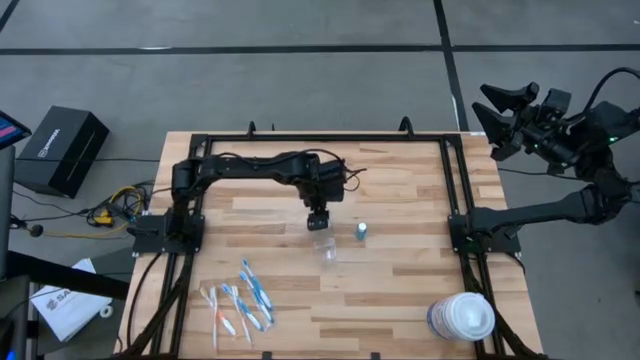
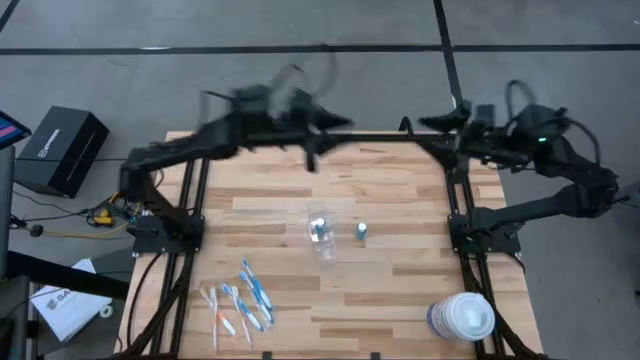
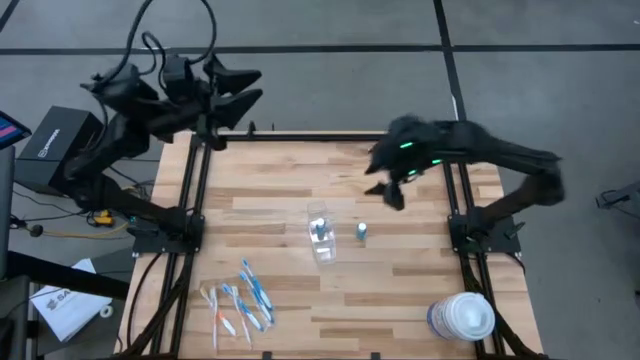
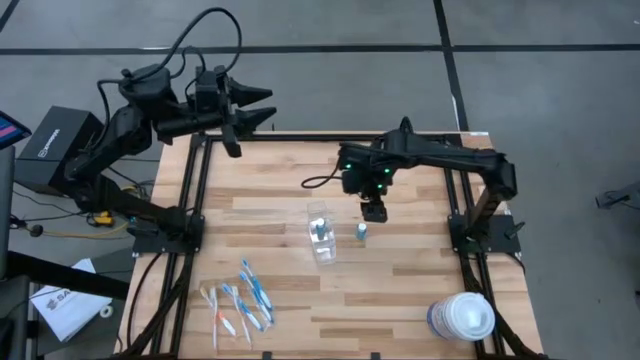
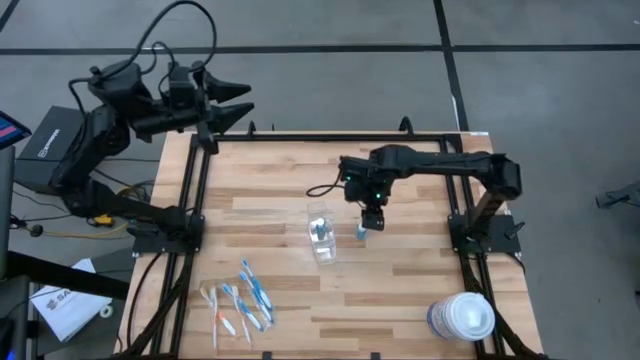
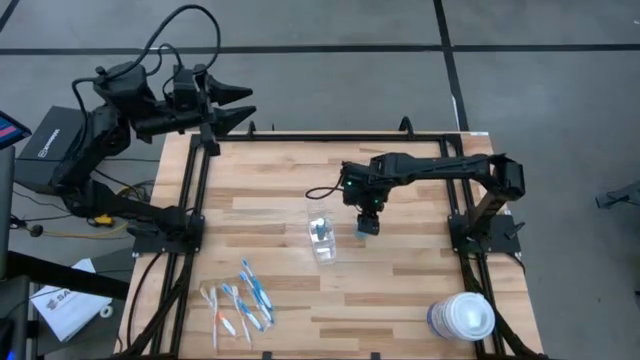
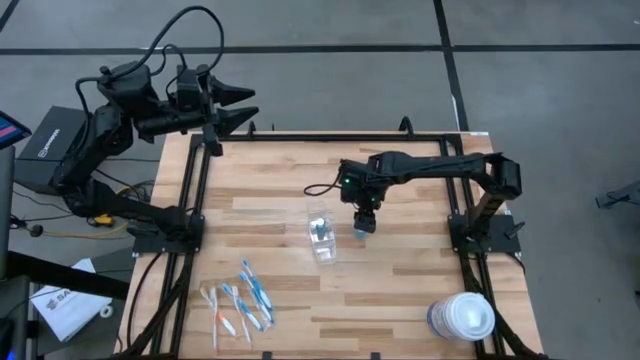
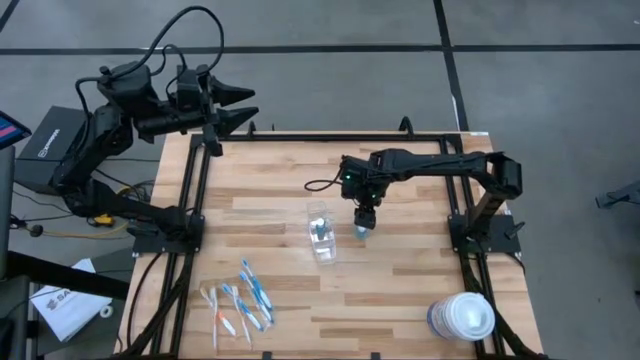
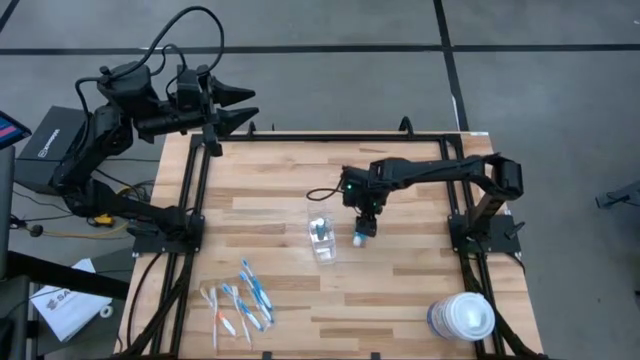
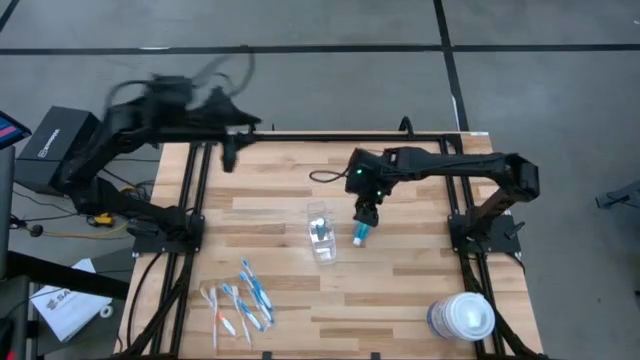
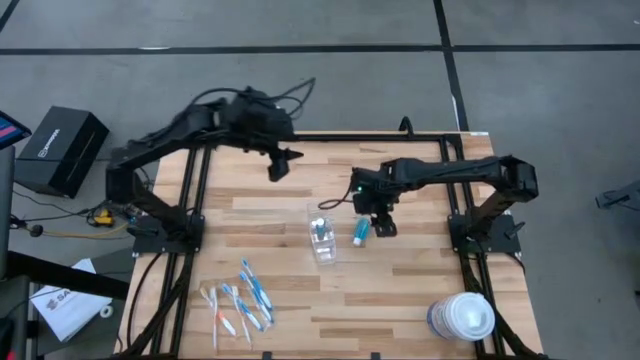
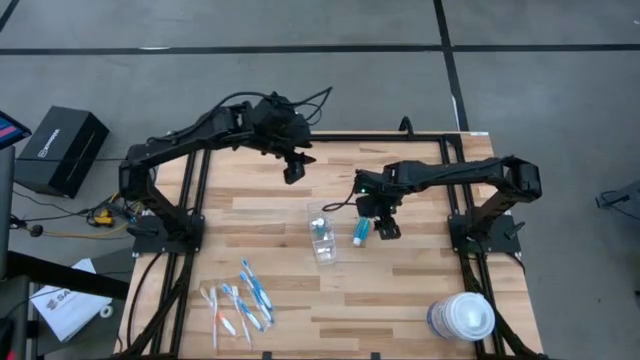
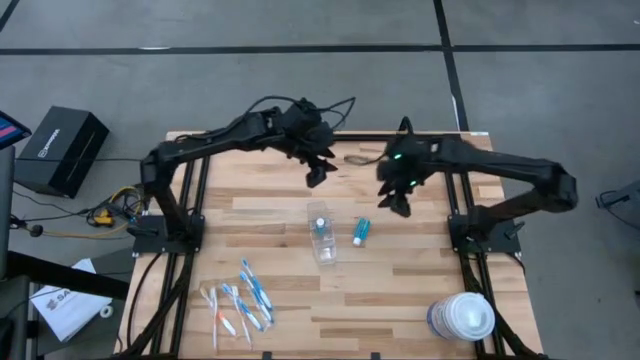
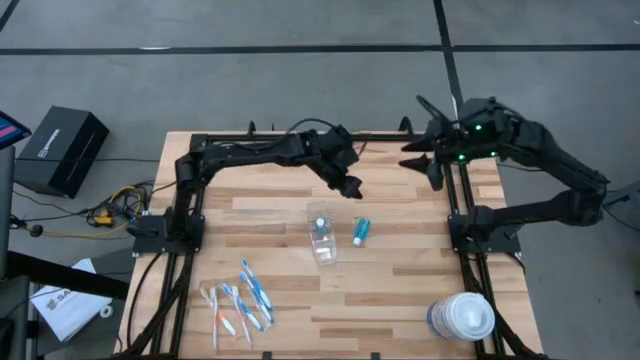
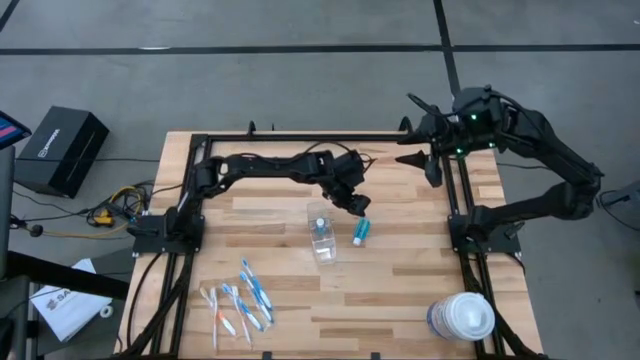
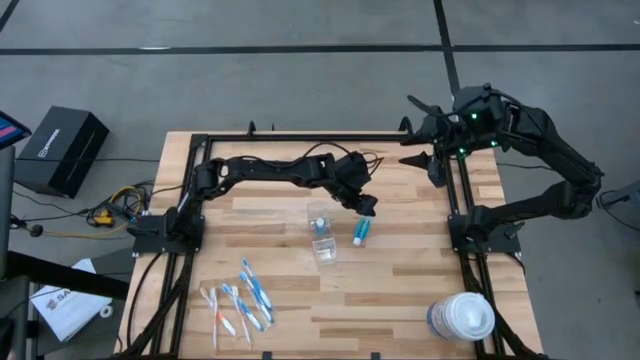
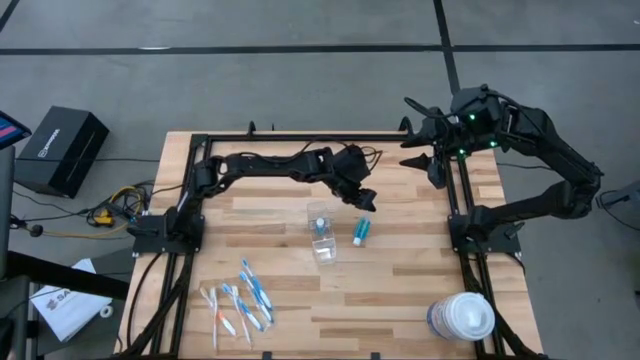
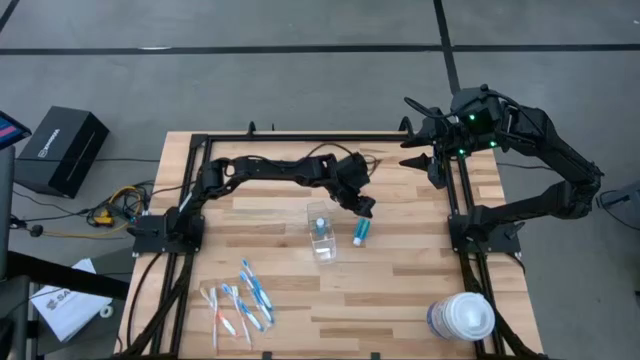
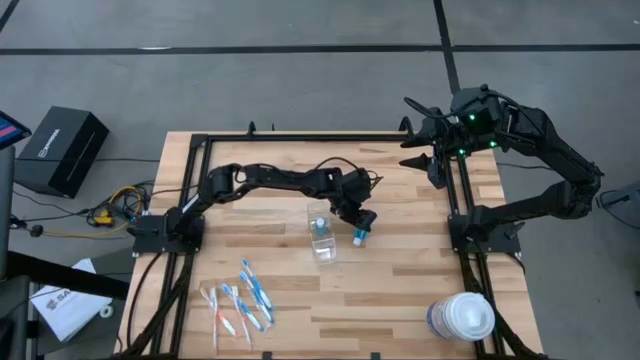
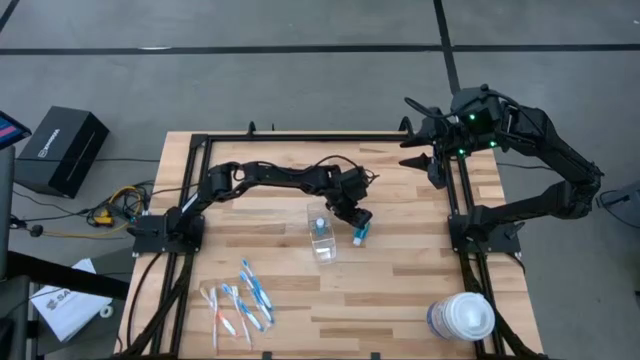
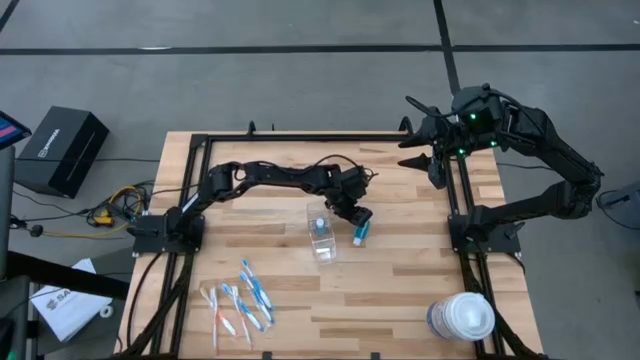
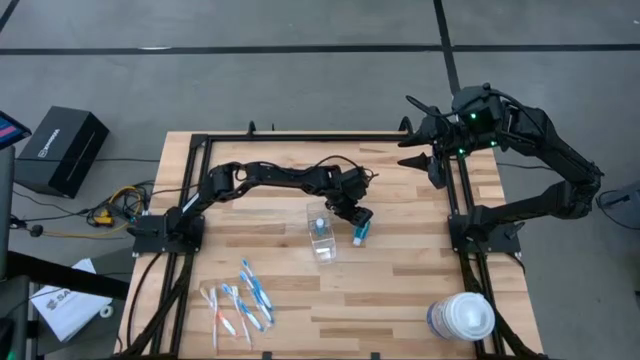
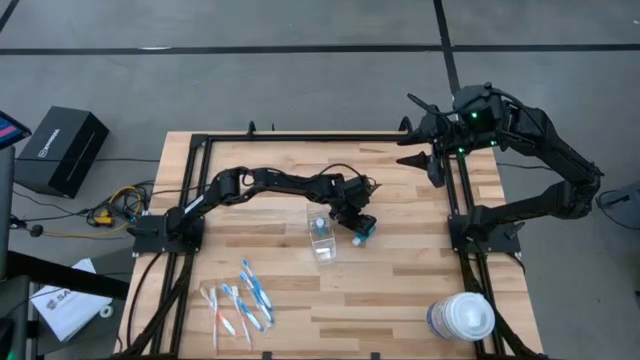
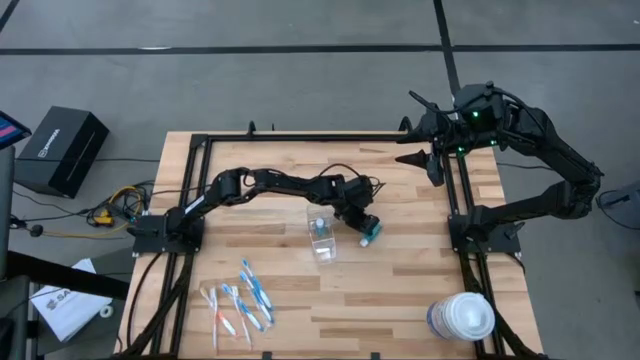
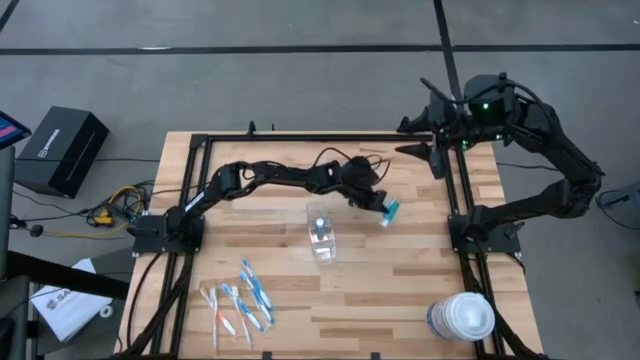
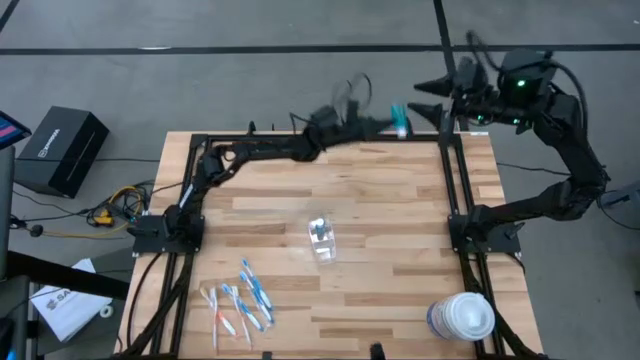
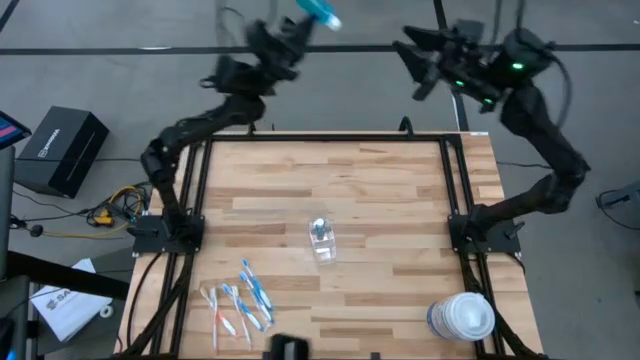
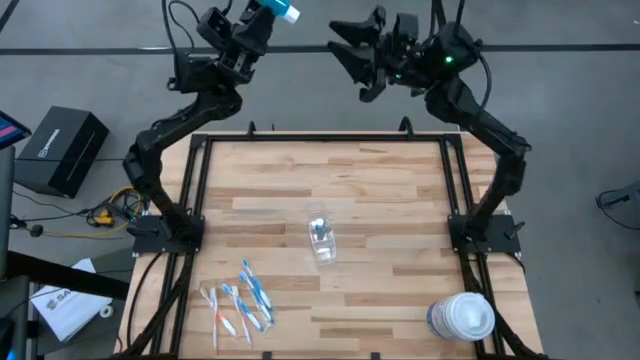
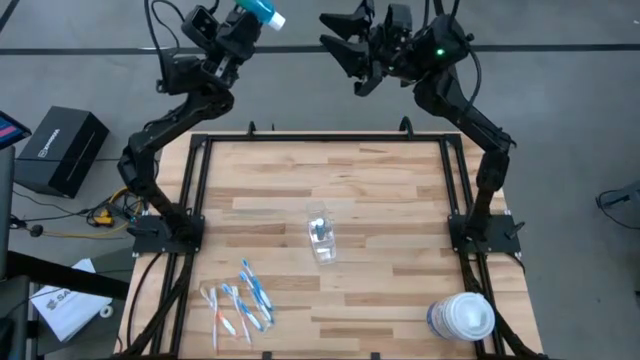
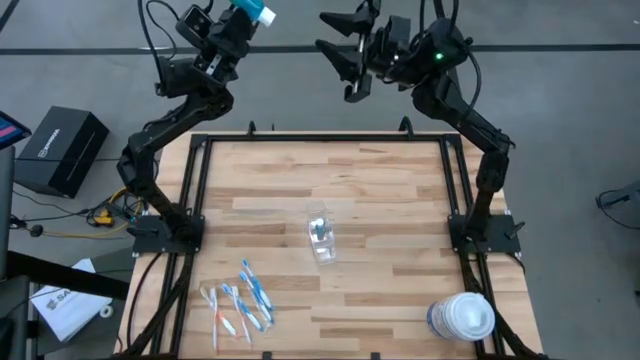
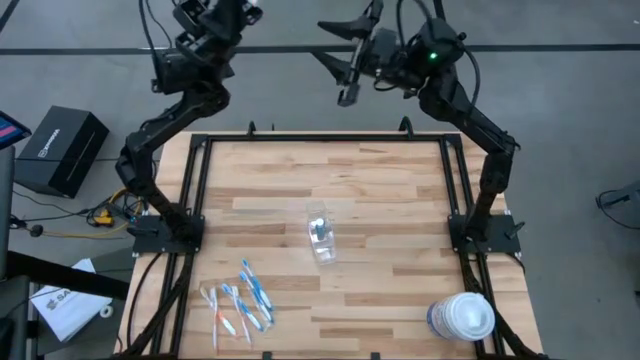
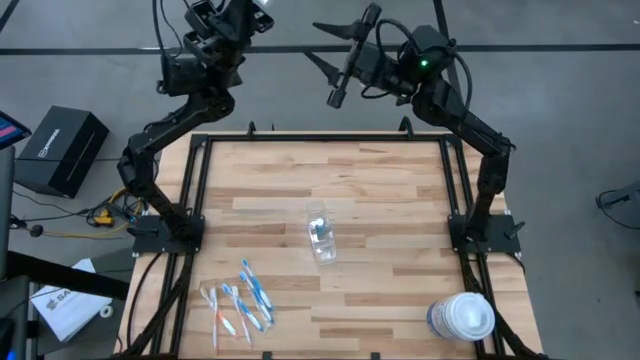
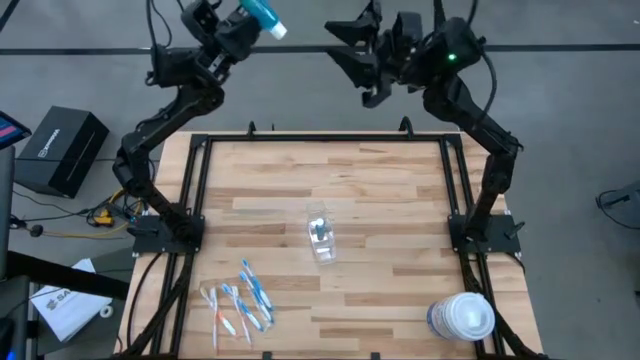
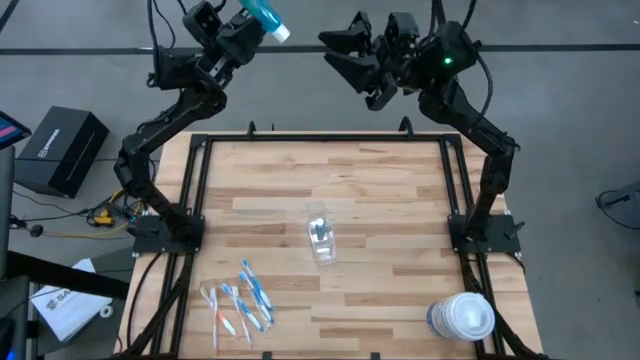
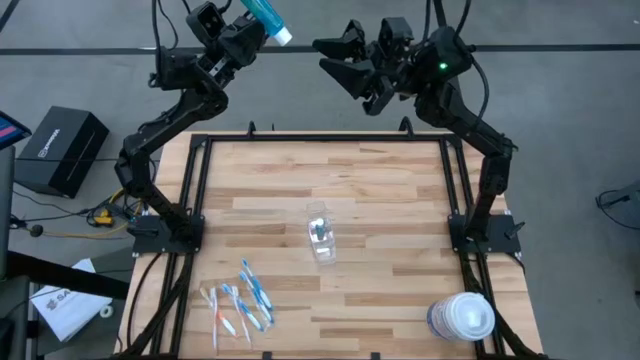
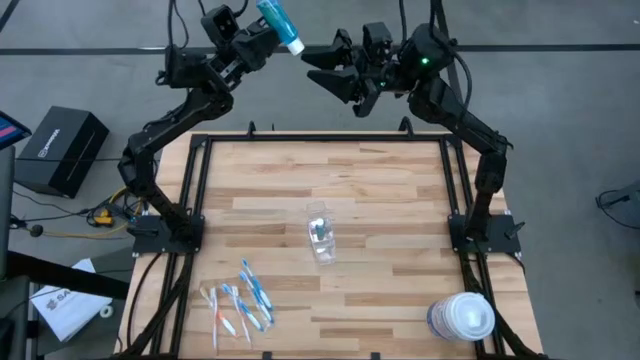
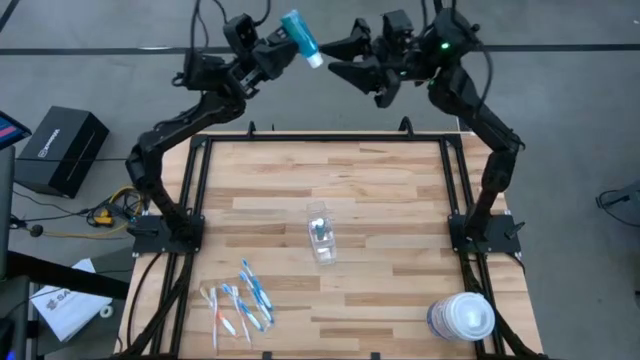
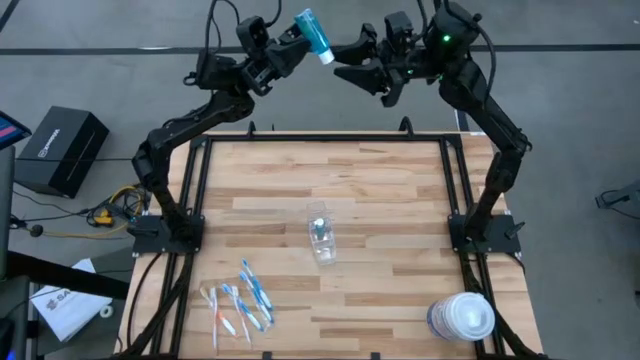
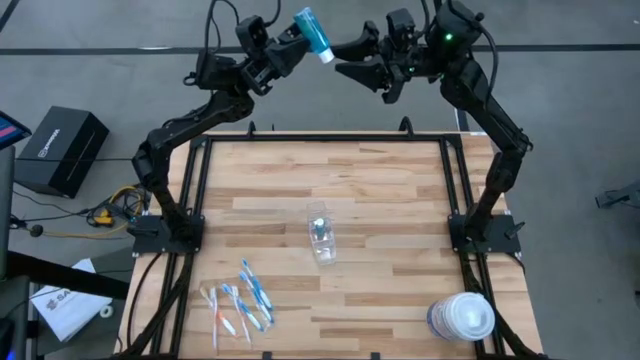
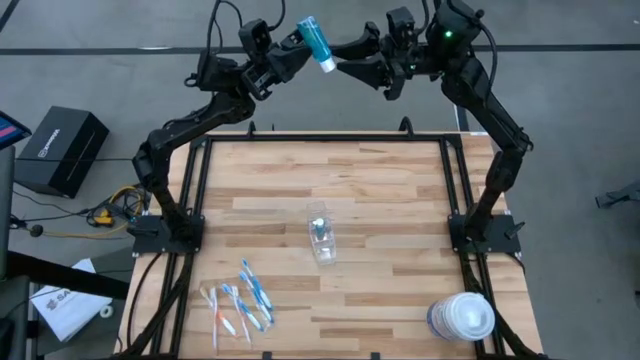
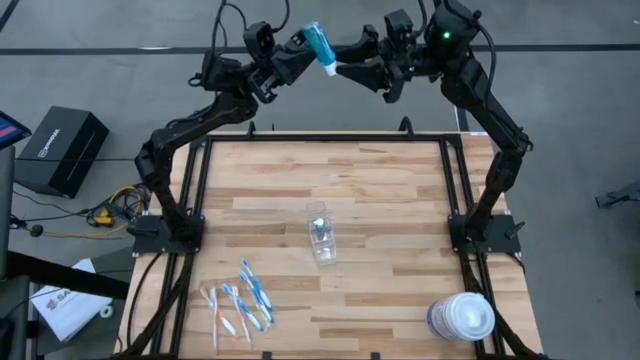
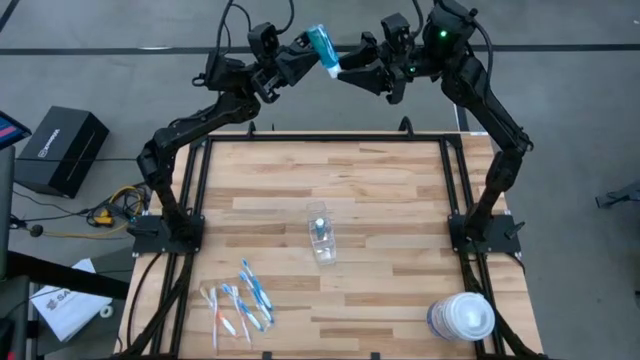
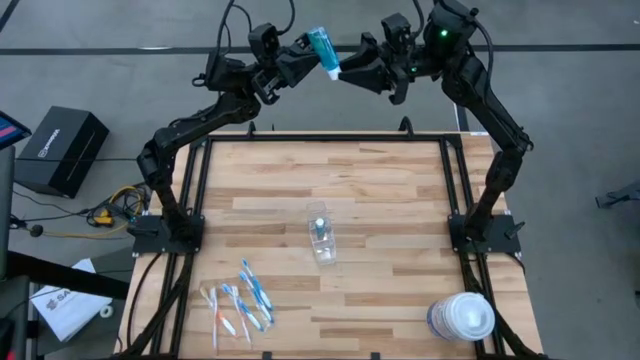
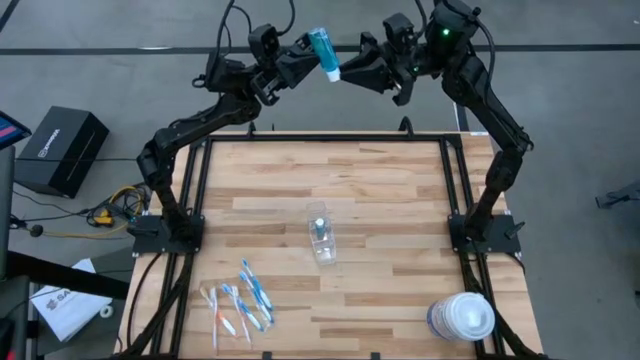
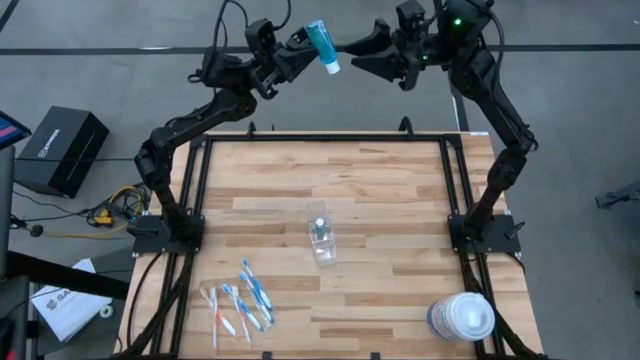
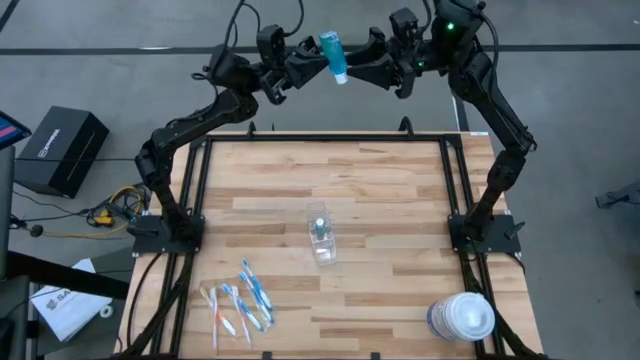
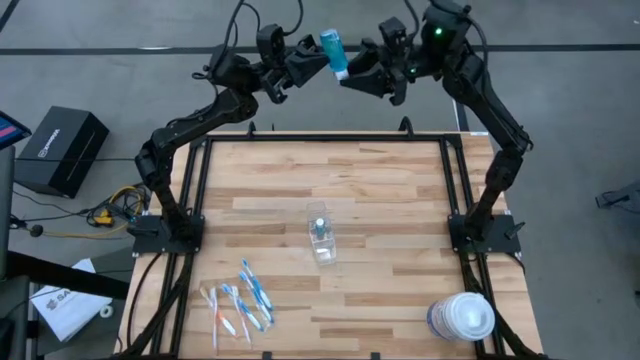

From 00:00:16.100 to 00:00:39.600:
Task: Pick & Place toothbrushing station
Put the blue mouthwash bottle into the transparent organizer
